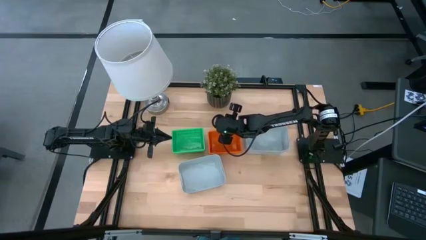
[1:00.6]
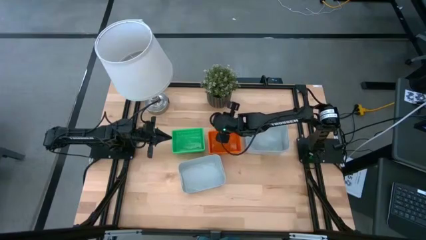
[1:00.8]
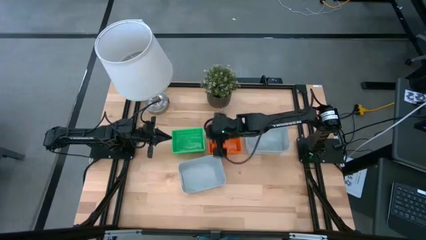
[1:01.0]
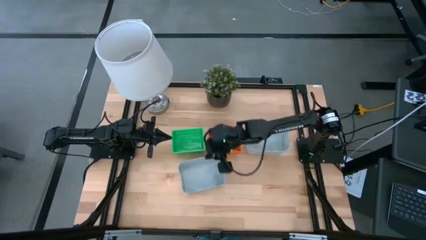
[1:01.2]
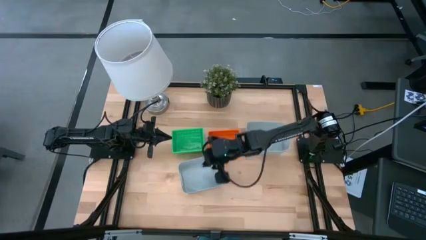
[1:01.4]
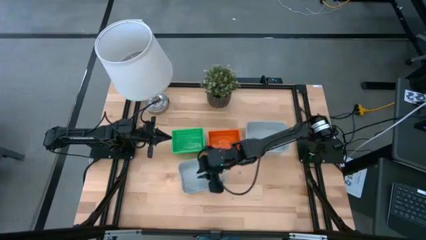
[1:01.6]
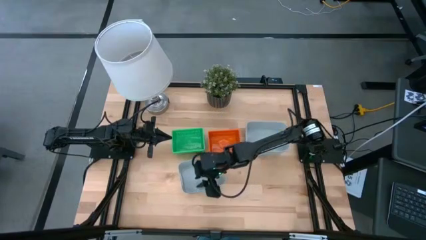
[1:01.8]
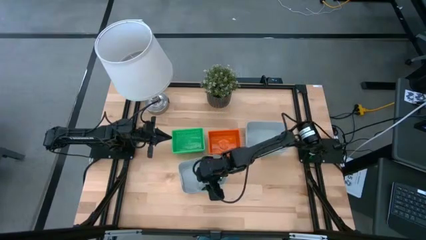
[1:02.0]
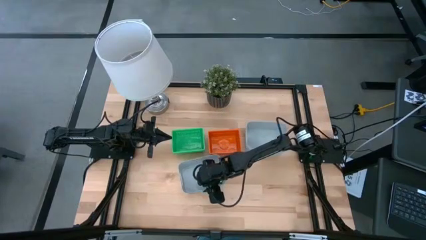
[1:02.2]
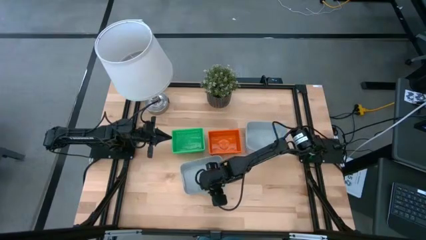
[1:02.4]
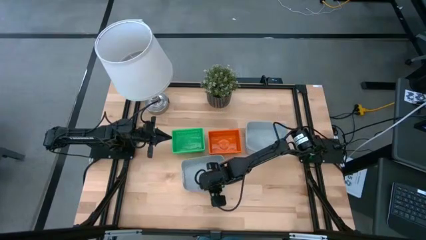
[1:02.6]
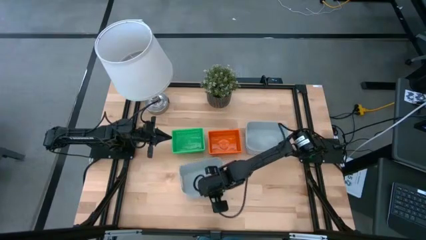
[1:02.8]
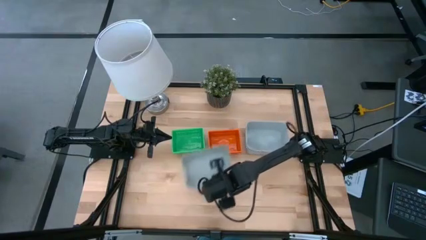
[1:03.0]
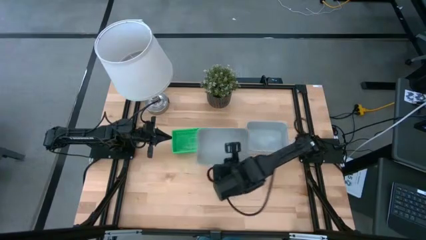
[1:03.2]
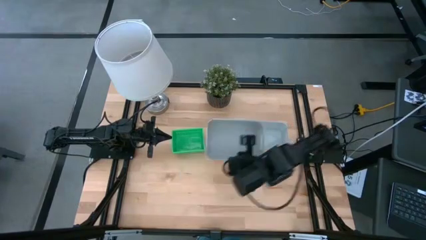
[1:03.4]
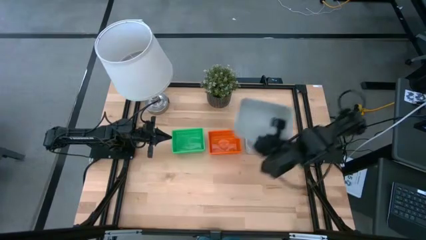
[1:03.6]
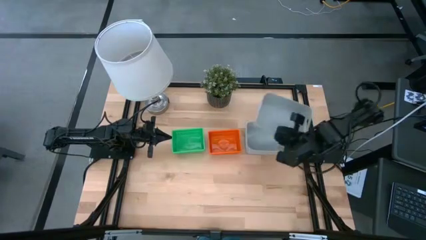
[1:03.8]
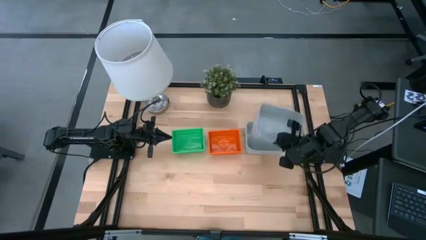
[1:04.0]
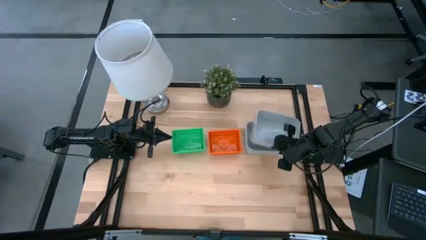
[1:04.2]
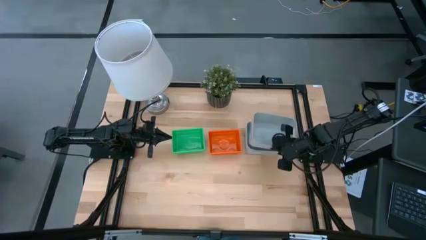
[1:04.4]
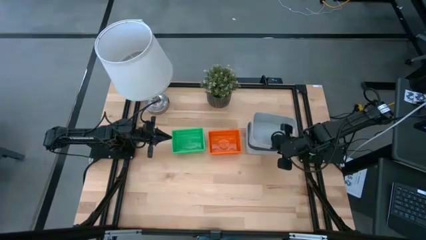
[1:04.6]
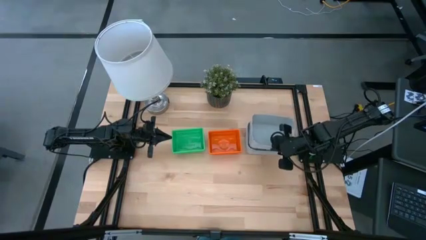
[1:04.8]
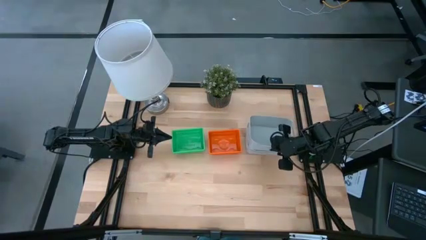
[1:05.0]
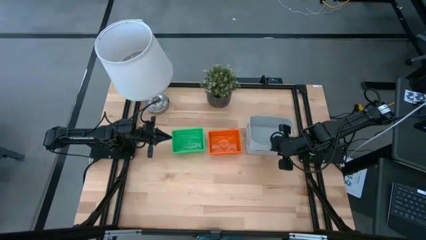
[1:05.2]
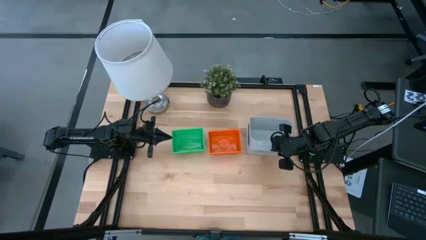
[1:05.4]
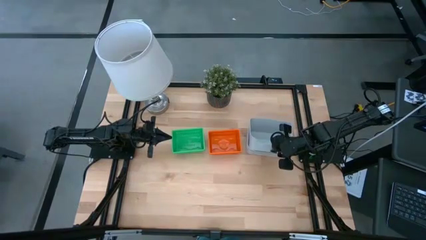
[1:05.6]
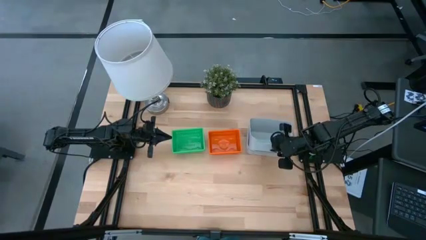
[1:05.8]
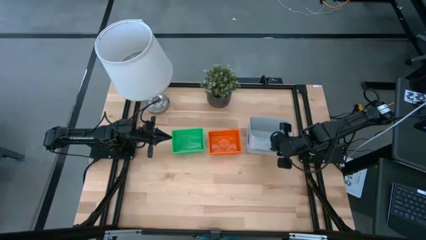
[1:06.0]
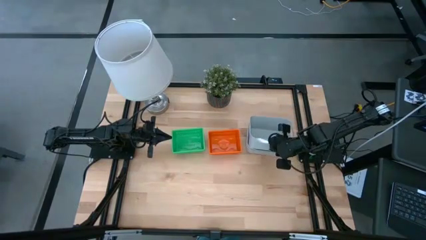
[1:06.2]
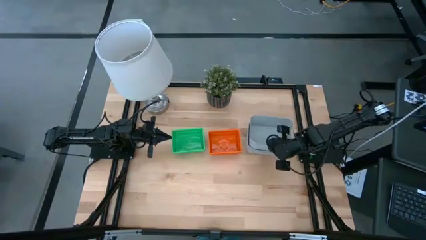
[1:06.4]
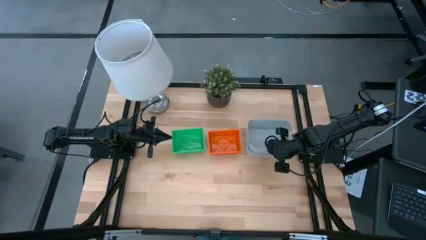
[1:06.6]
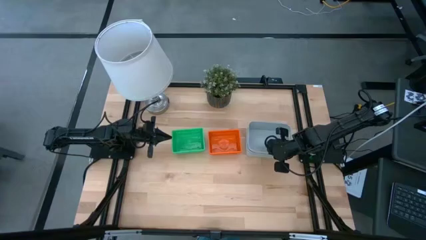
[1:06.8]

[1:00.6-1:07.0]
Stack the bottom gray bin on the top of the gray bins

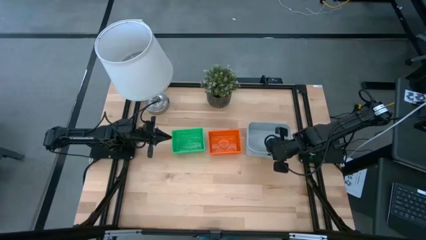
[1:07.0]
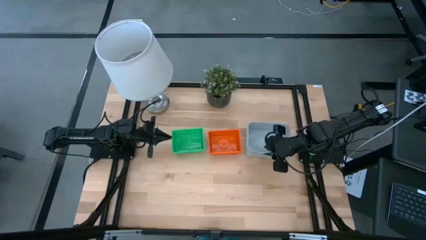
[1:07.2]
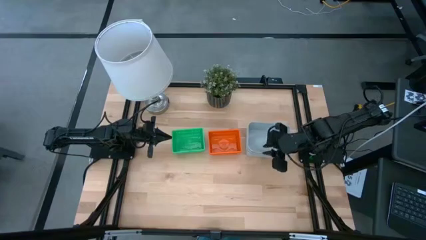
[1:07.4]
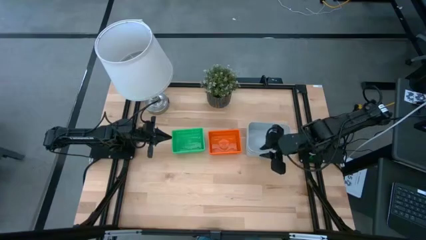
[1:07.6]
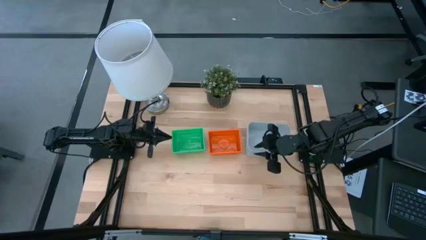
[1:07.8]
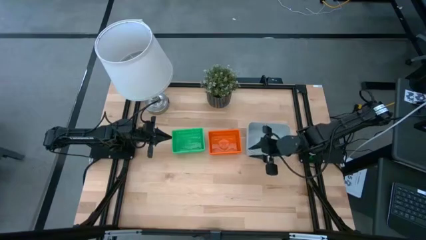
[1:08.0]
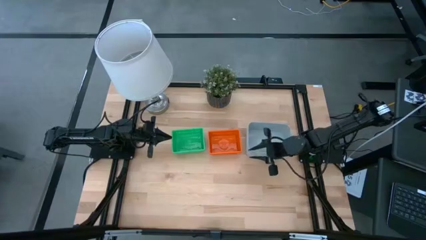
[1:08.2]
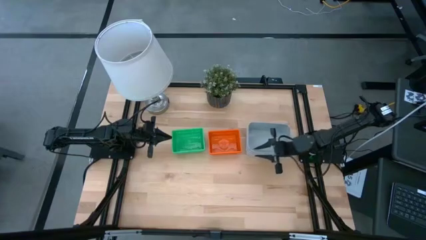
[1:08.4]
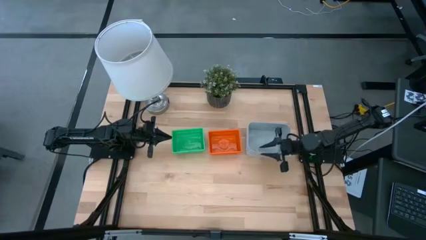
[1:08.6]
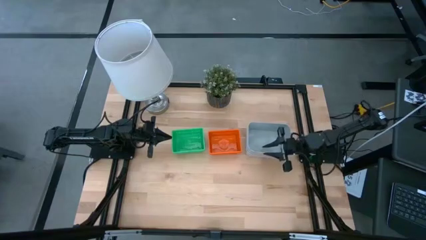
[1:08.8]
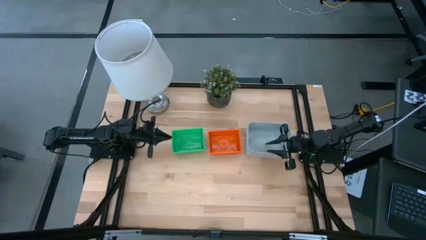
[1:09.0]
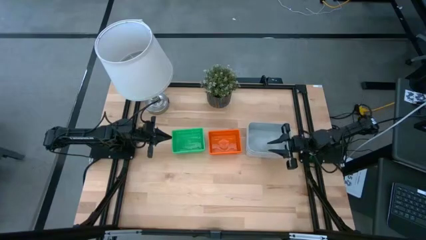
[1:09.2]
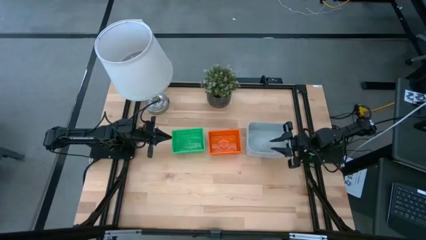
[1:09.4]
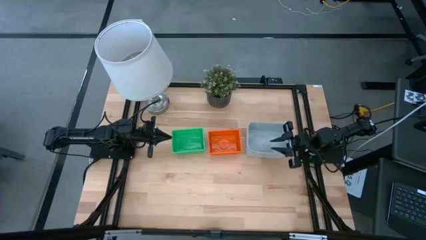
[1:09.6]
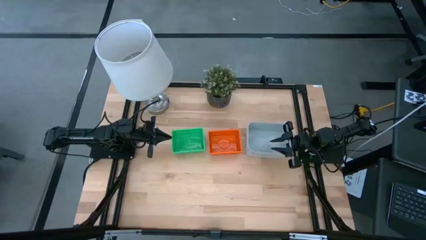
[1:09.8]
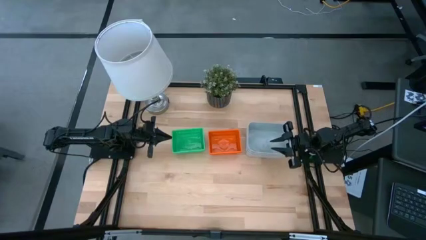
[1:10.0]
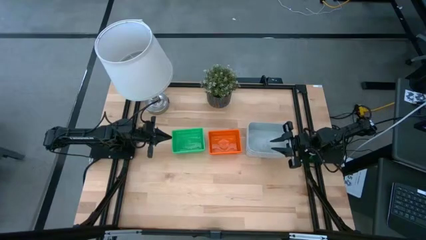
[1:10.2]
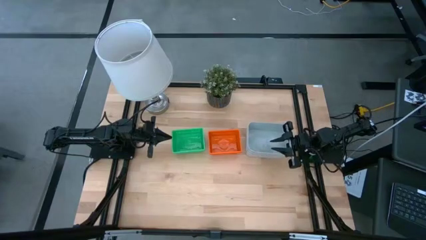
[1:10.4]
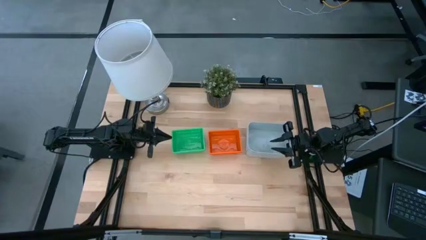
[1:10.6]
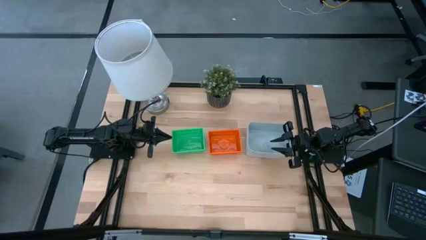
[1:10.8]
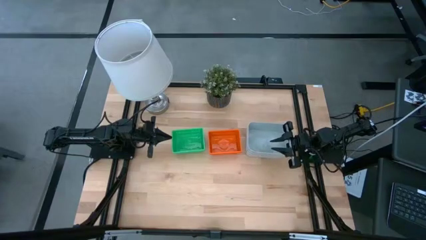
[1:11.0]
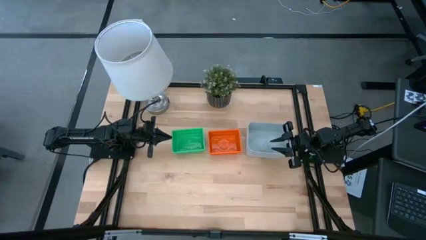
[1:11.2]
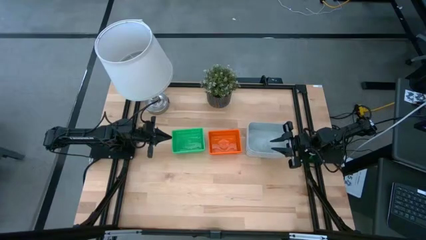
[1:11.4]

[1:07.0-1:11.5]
Return to Home Position
